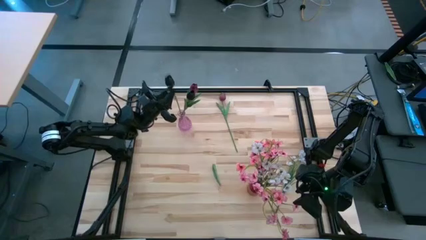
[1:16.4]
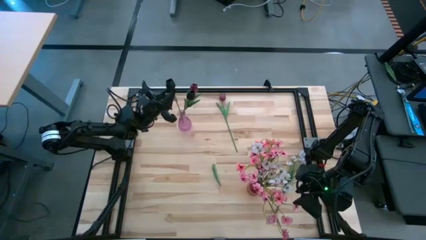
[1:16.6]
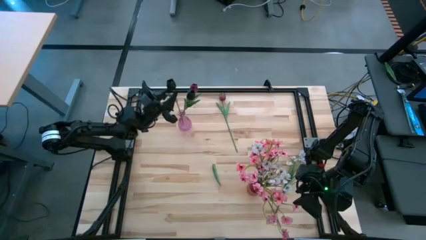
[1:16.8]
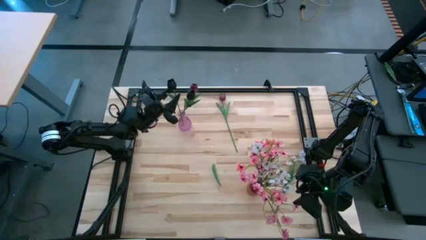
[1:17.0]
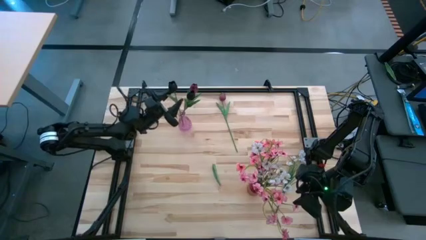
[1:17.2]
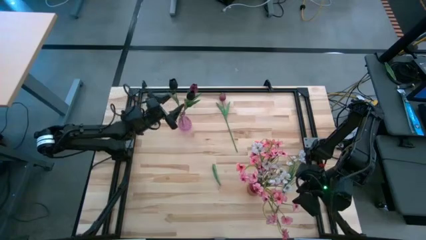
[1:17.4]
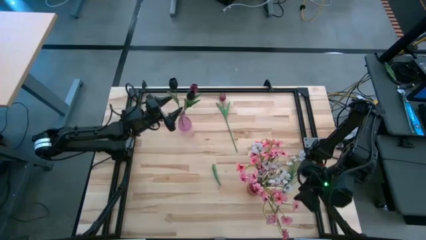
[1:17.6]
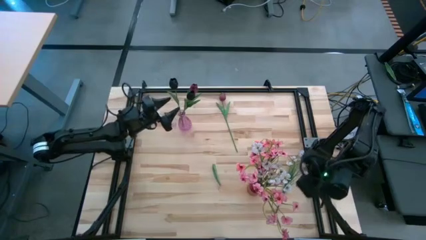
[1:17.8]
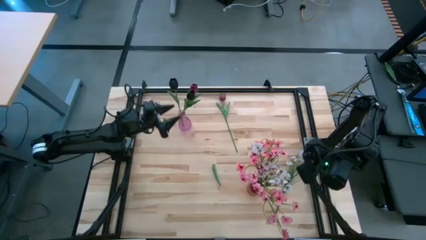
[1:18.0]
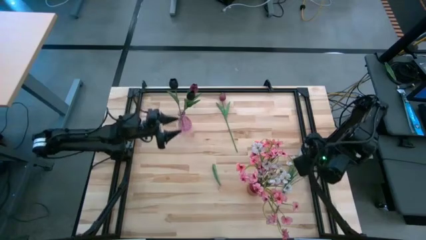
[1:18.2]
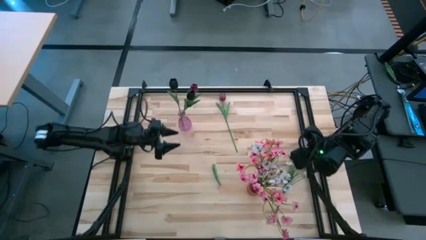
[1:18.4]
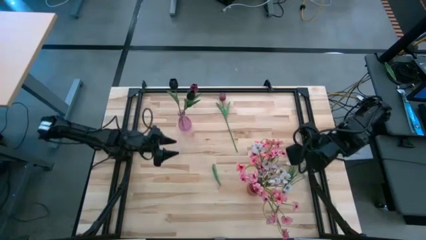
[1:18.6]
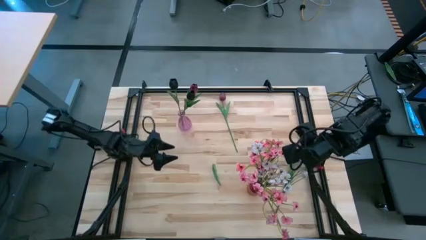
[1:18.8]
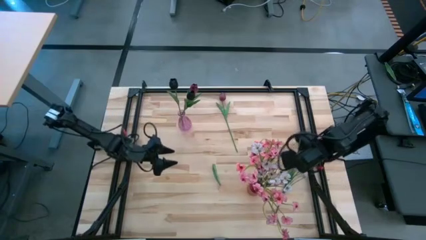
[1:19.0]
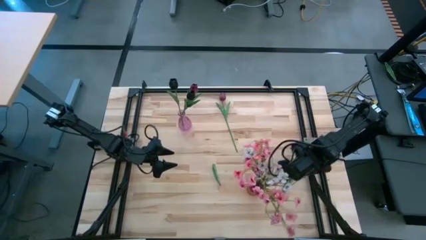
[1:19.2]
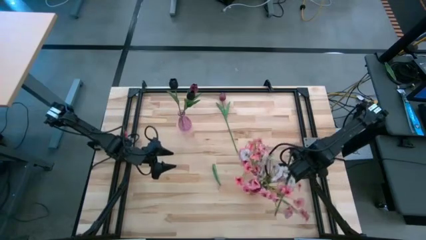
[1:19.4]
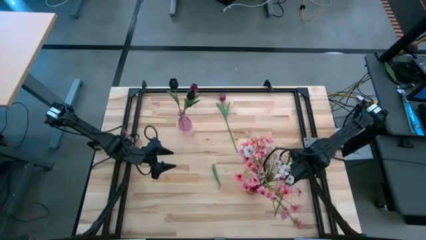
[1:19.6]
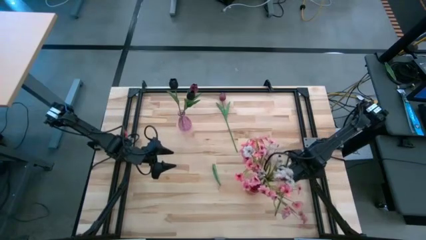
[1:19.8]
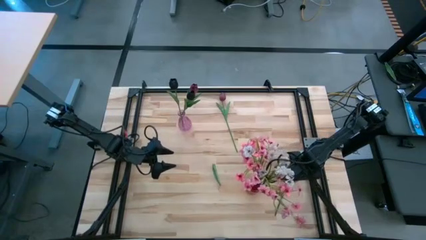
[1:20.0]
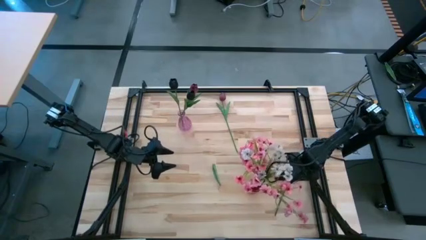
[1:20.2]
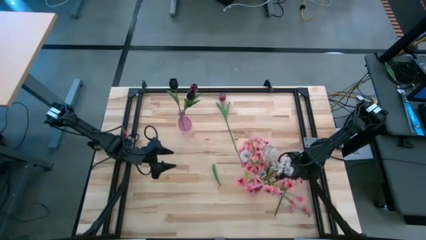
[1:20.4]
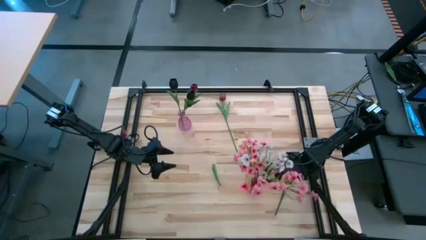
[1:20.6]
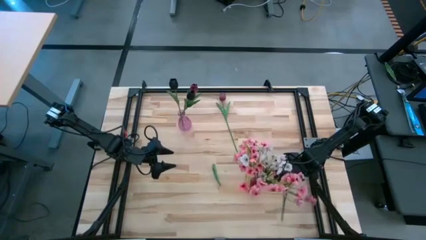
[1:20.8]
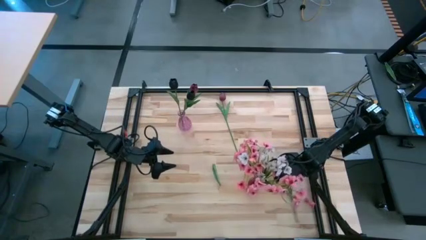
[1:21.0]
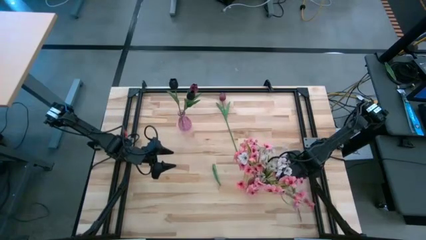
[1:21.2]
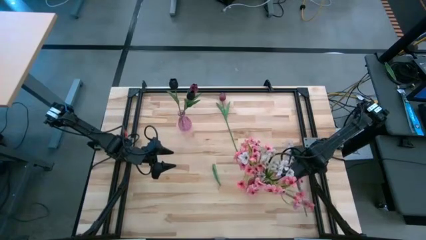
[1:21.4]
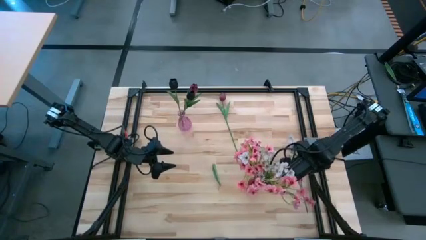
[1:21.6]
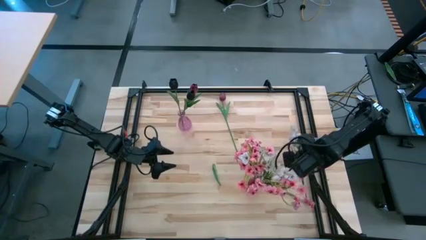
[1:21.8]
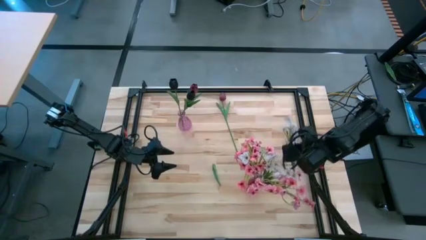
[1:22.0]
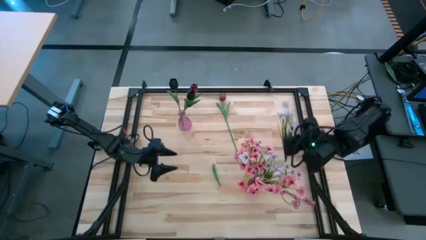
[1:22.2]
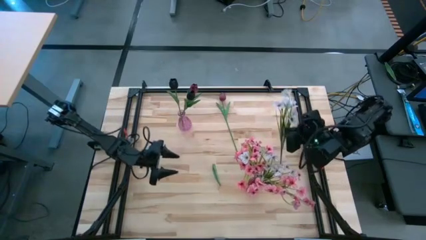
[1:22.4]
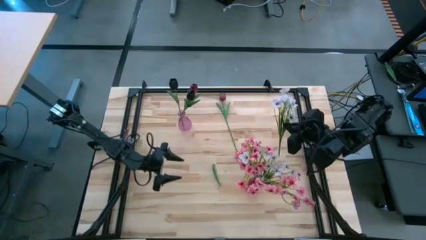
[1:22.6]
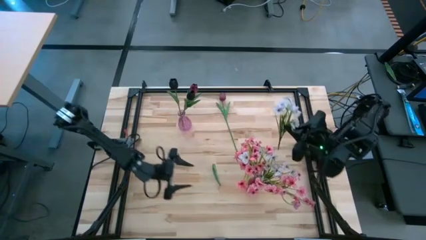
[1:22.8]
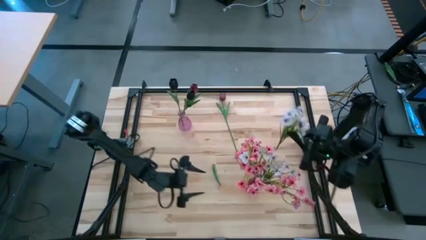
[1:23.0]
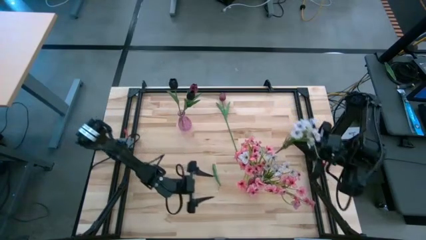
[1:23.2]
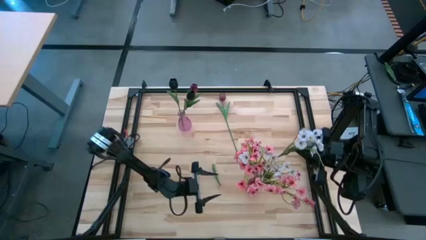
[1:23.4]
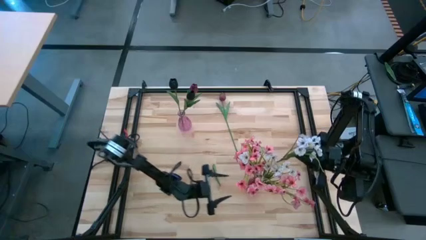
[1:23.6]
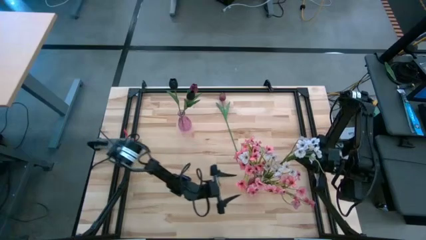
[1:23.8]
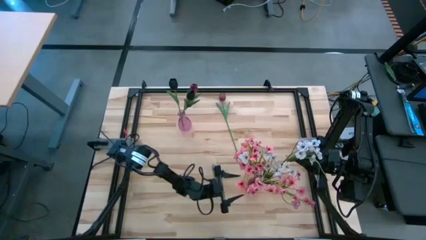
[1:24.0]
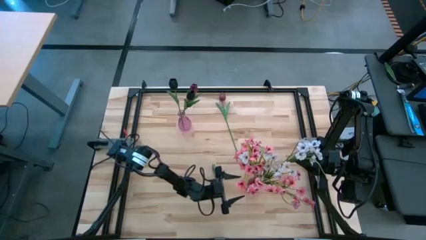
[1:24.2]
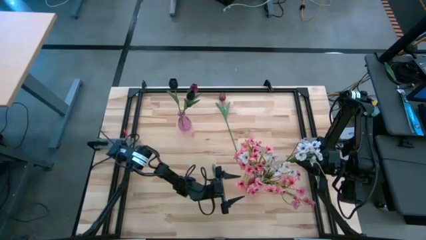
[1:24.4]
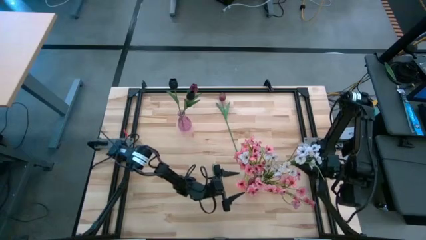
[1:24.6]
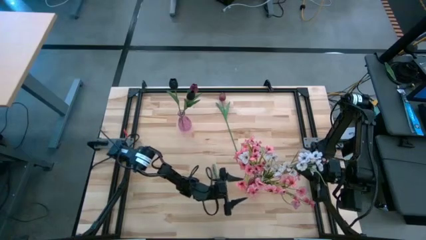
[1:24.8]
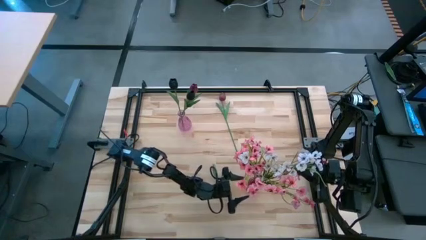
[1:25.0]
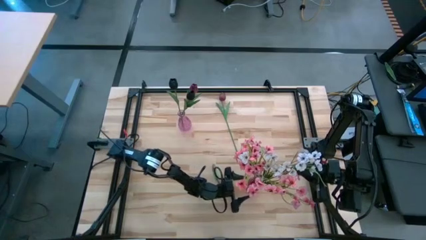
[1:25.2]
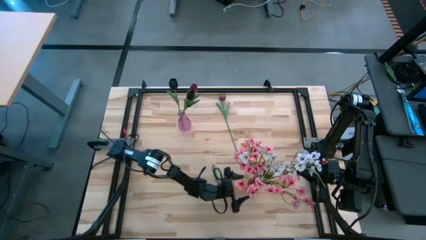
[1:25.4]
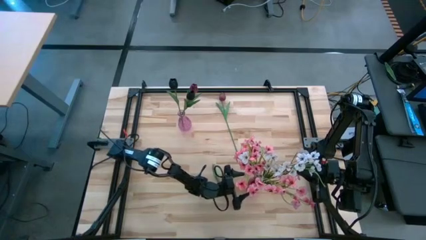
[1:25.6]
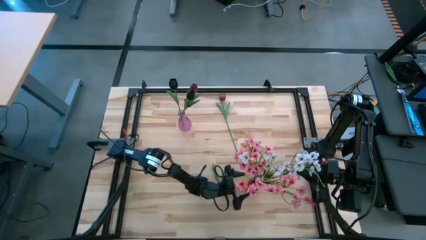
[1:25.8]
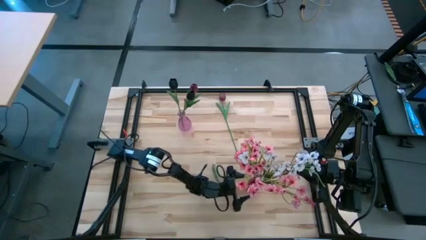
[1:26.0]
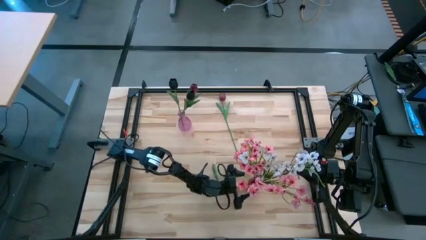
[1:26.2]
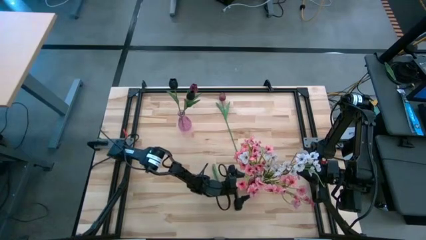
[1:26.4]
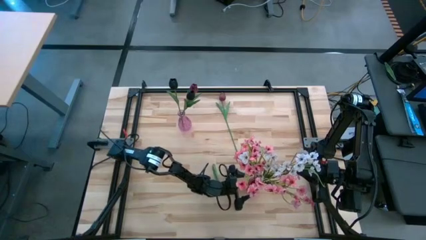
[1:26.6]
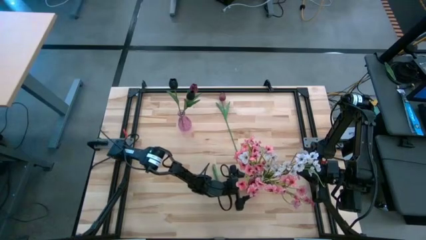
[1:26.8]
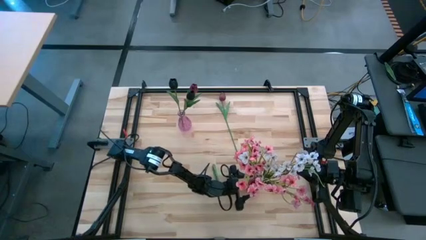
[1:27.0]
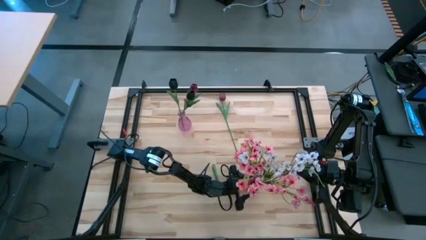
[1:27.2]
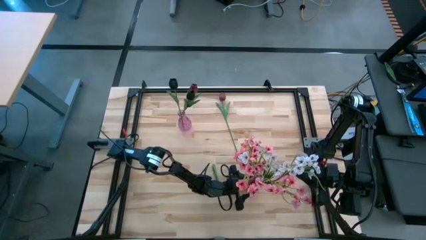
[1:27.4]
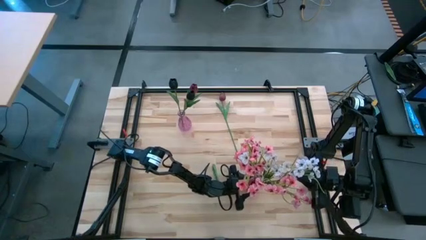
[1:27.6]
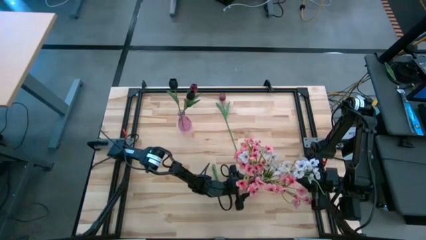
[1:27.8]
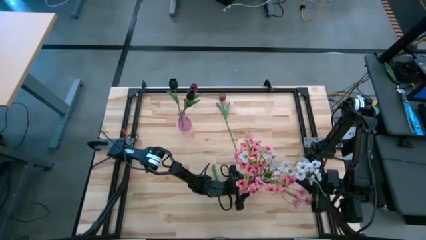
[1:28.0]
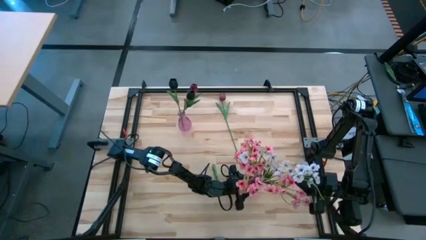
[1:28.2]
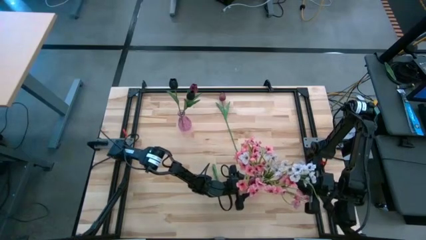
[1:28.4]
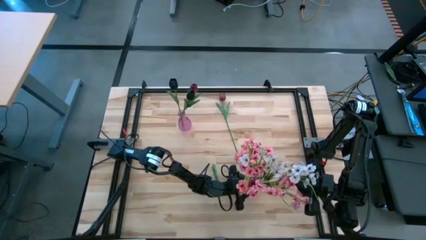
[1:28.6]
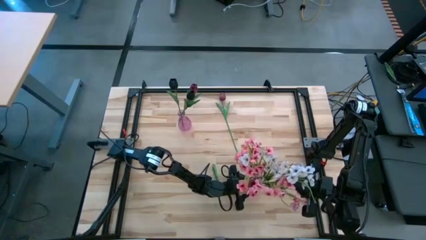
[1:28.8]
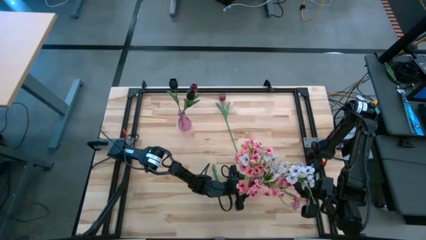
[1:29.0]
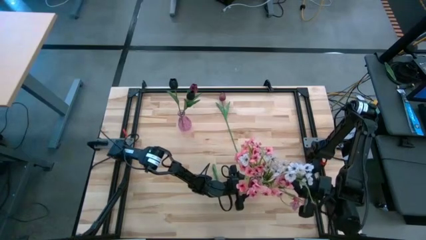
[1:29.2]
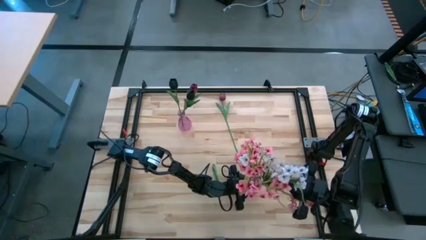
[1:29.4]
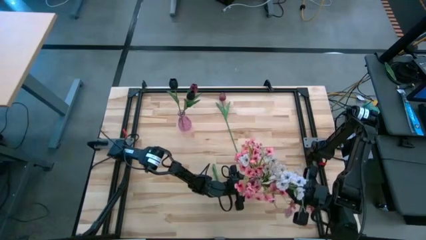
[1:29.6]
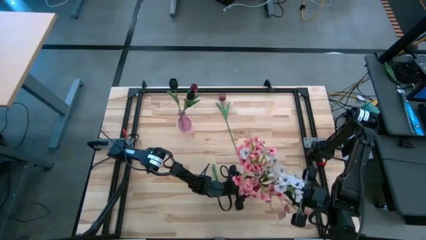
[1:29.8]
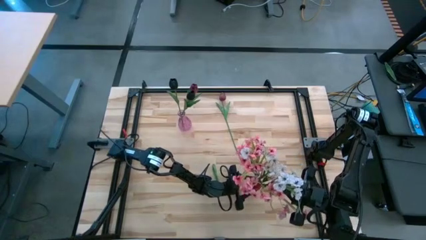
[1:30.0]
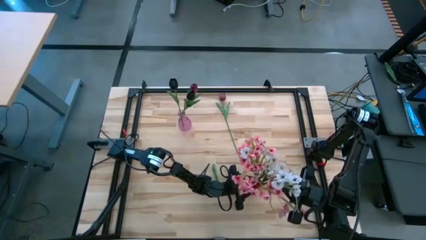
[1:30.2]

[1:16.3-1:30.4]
Task: Sort flowers into vase by color
Put the white flowers into the red vase

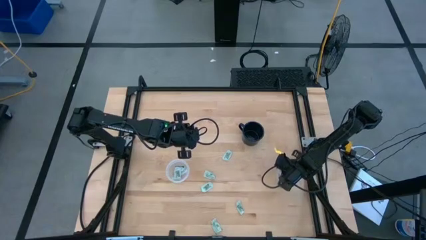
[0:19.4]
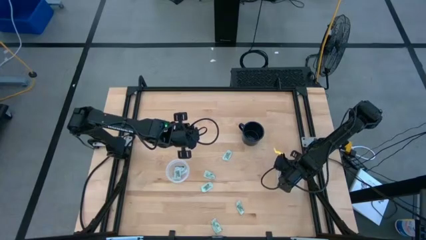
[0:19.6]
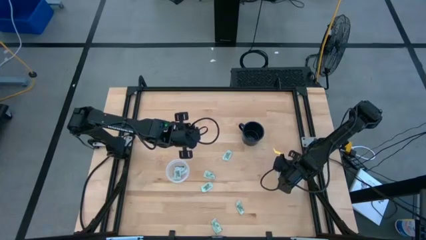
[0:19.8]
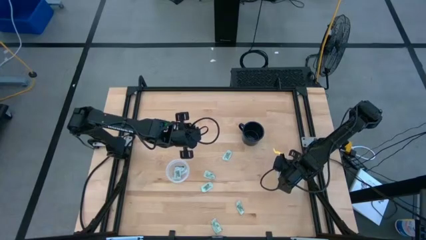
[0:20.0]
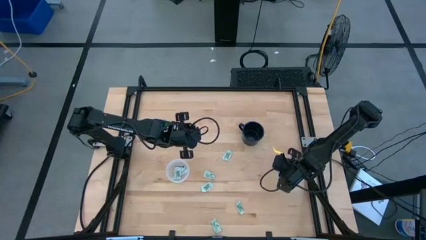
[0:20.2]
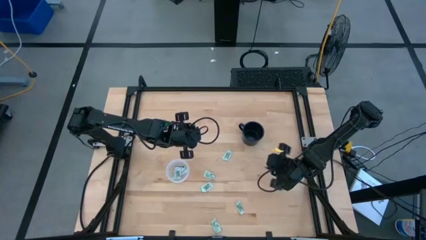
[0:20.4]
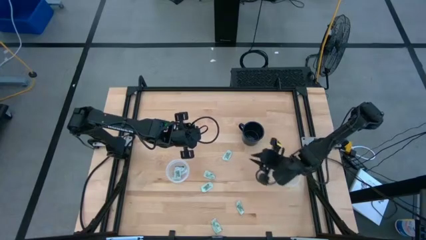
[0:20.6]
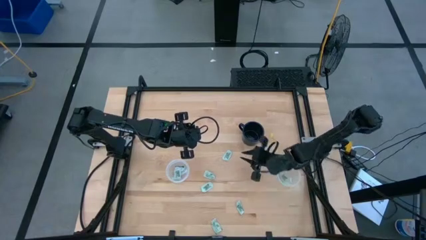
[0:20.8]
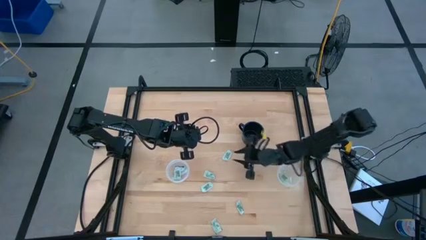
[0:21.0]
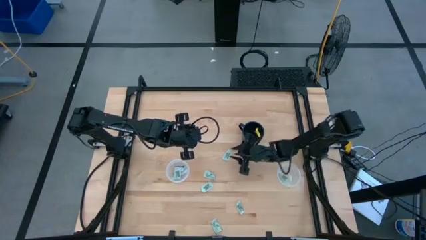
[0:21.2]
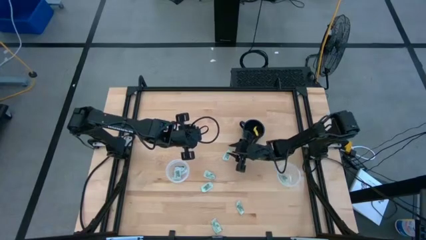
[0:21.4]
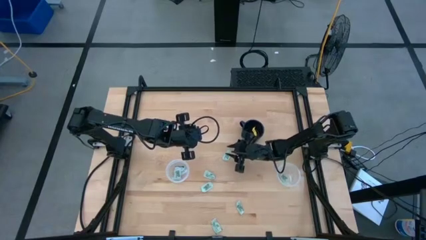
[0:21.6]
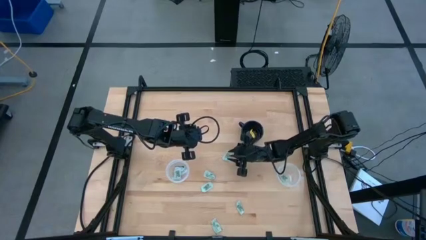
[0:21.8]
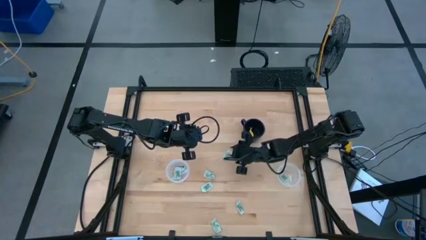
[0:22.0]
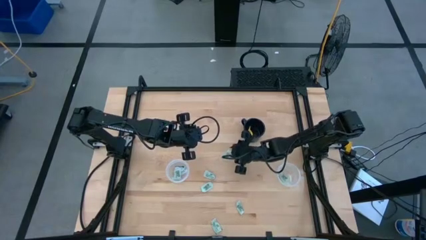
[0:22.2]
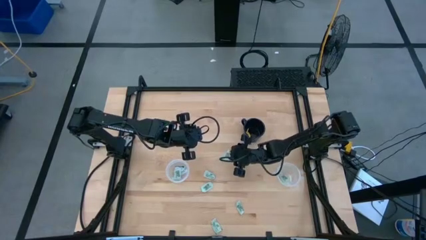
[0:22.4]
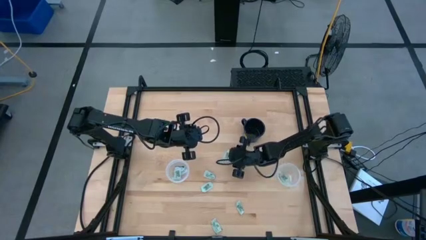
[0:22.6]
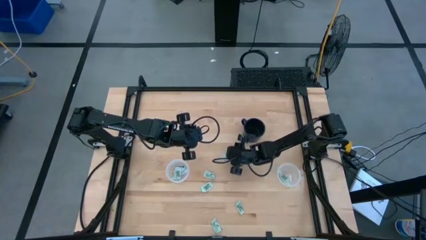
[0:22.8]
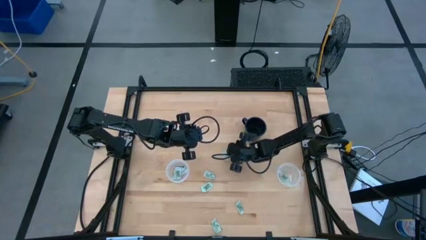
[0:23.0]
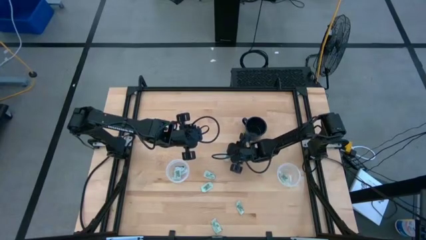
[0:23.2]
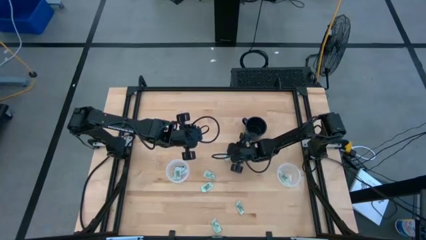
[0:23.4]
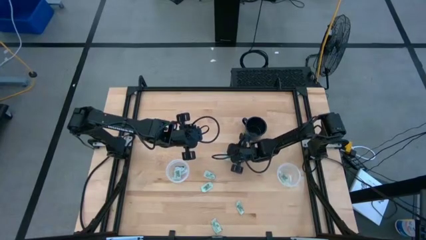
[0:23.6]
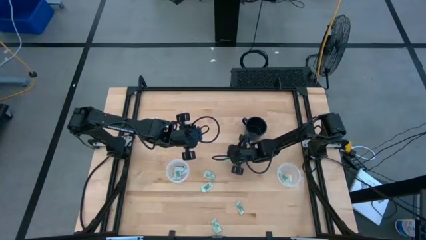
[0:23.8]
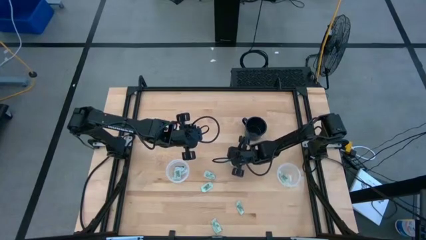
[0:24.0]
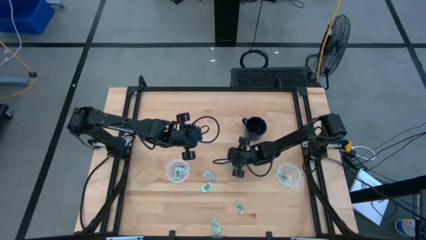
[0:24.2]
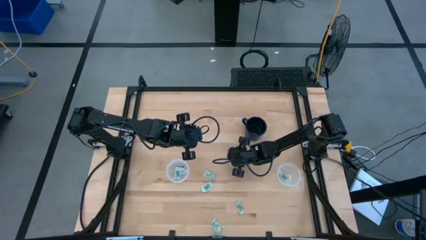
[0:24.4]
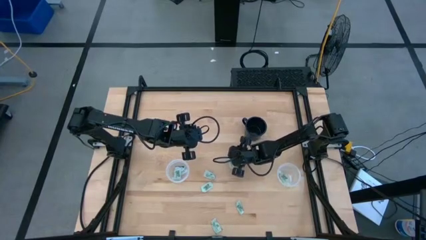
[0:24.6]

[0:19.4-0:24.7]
Task: Pick and place Stevia / Truvia into bins
Put the stevia packet into the right transparent plastic container
